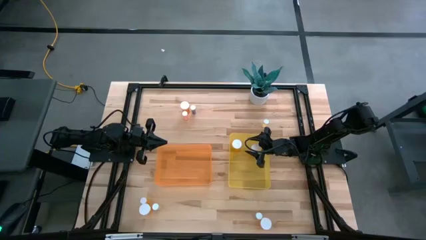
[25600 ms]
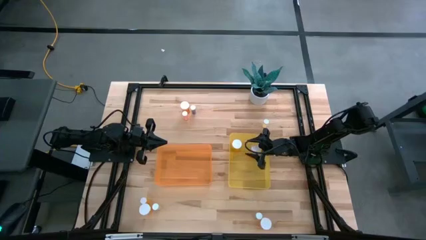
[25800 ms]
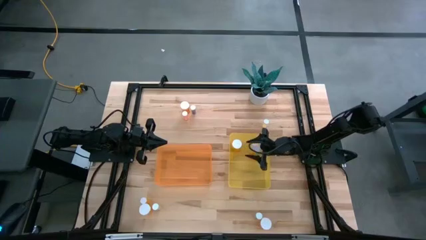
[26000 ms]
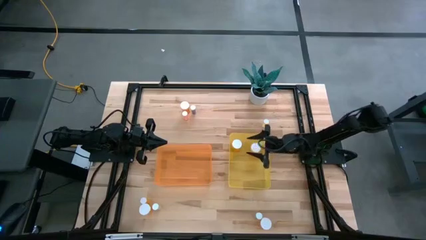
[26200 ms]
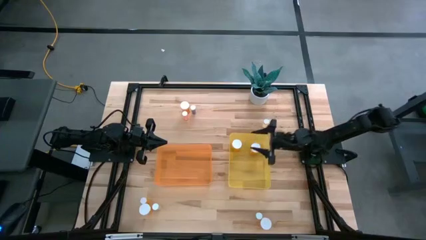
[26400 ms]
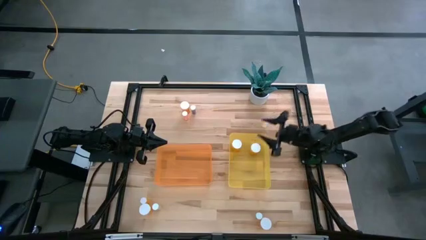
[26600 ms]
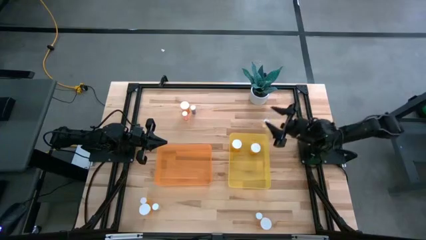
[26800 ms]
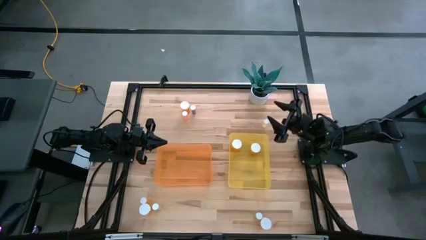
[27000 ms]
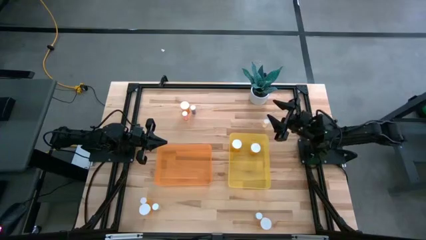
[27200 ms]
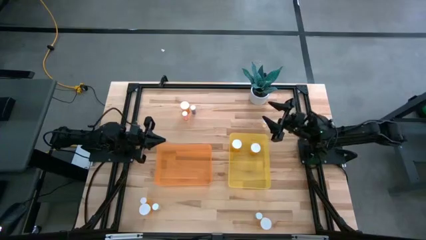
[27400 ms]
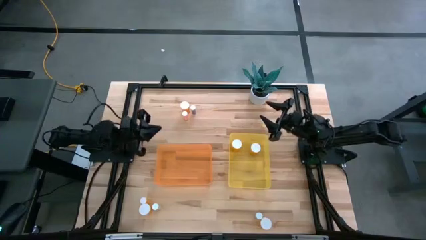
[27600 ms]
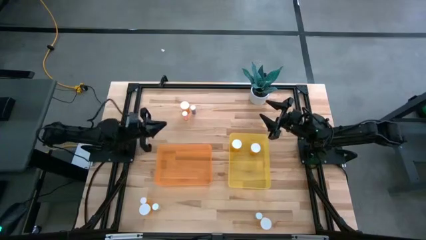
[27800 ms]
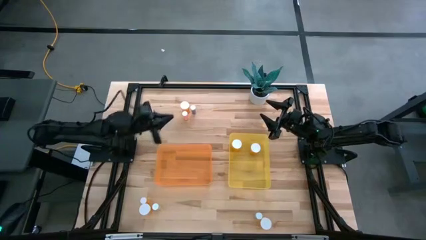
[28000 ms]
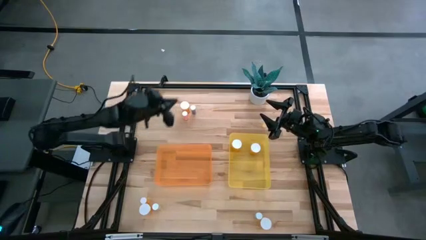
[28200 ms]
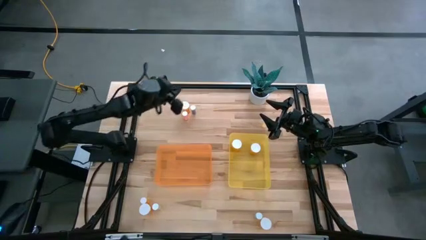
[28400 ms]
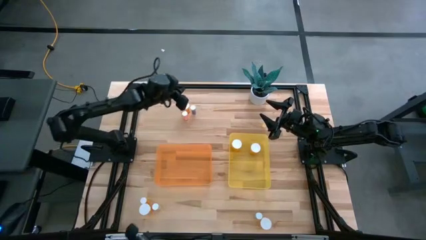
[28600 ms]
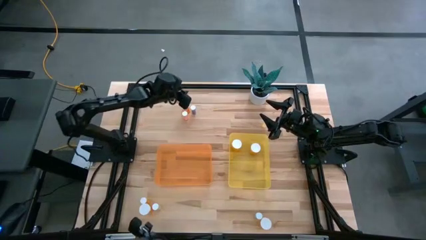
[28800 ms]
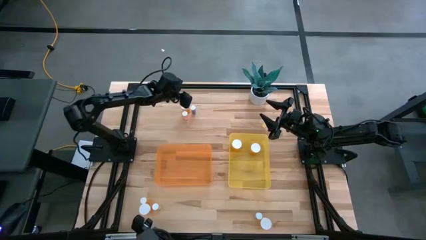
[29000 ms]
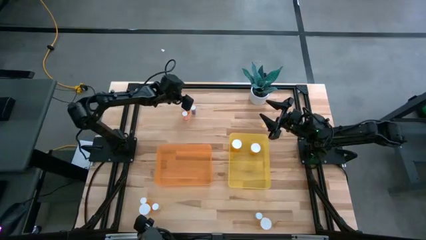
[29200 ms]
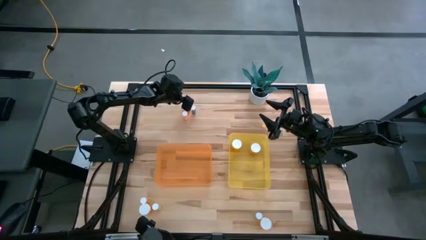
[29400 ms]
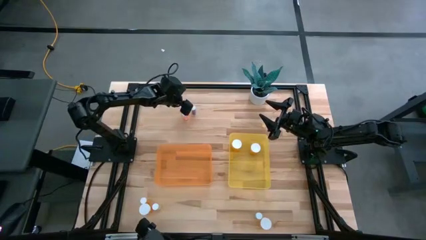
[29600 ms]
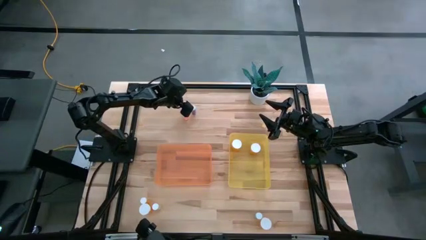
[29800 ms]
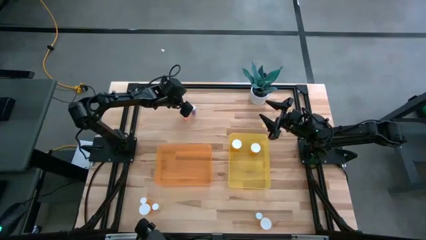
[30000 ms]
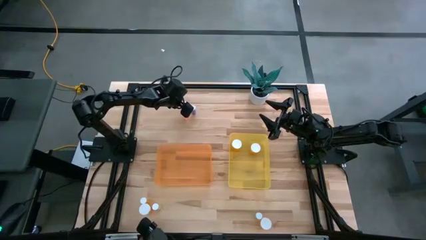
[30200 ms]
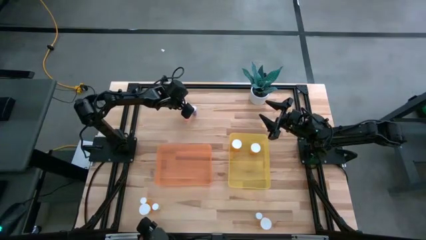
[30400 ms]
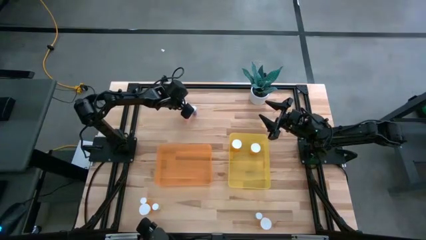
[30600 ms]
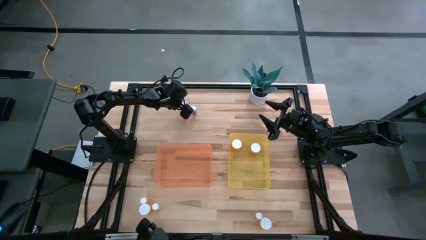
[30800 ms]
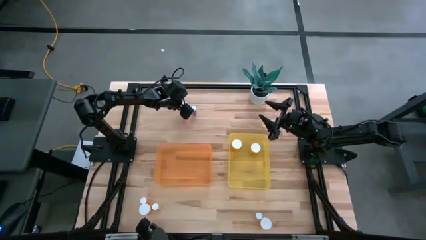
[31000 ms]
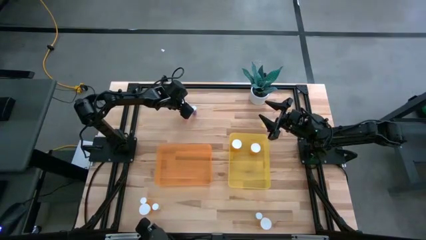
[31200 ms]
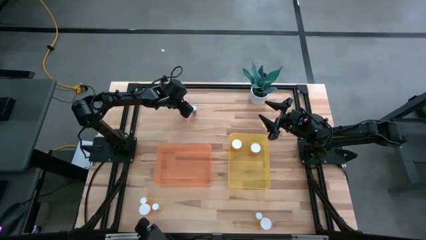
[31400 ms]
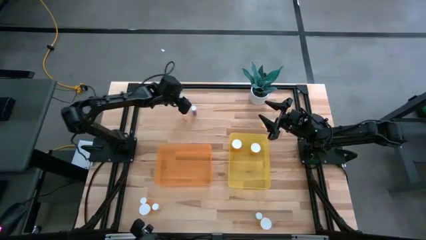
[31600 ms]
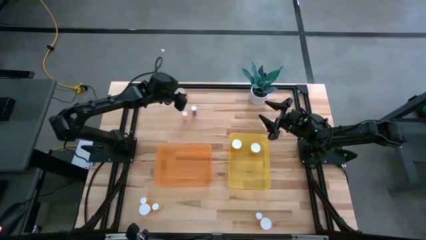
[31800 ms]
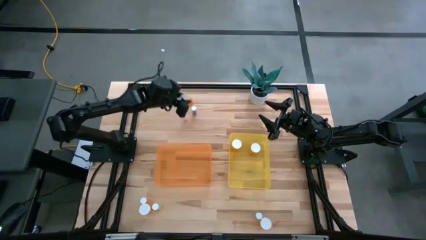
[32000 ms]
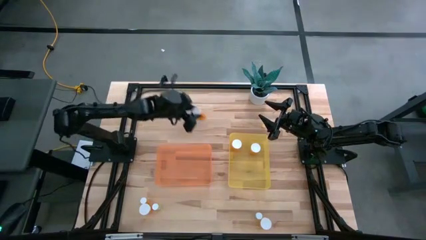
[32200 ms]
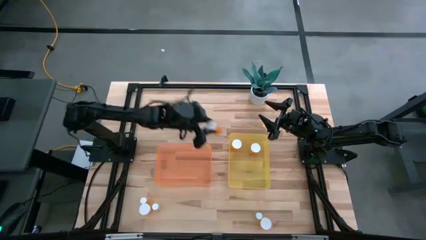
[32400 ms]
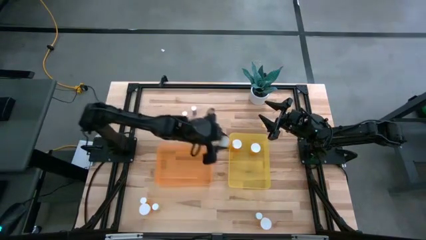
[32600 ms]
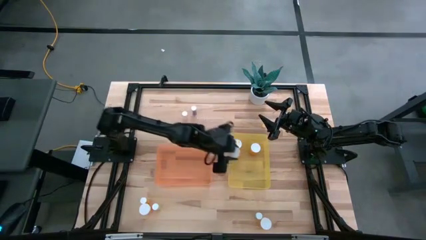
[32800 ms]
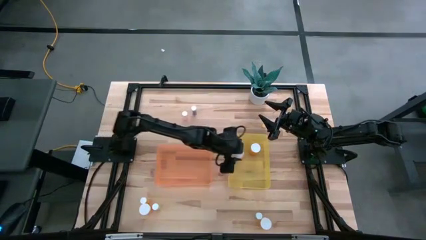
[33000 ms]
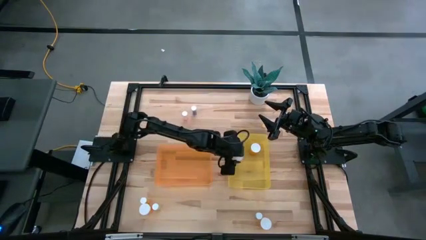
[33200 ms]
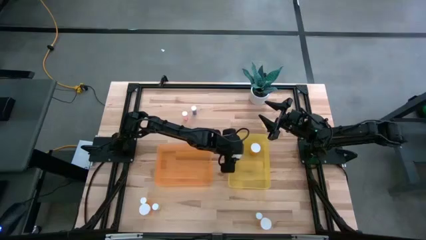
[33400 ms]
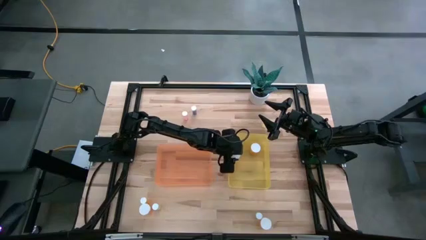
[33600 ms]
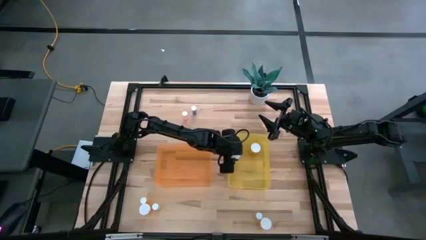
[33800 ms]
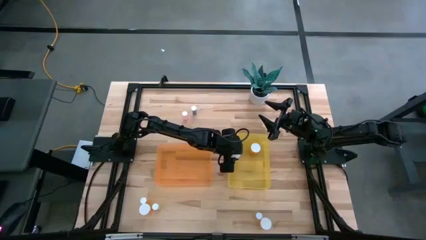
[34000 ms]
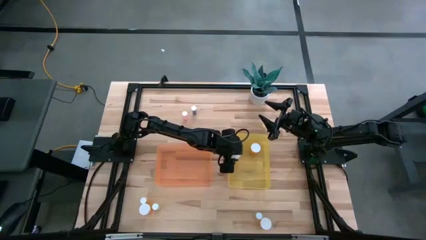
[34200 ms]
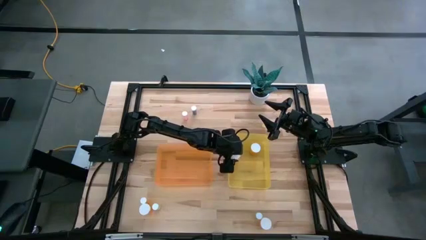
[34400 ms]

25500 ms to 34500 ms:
Task: Pick and place medicine bottles into bin by pill shape (circle, oval)
Put the top orange capsule bottle into the yellow bin

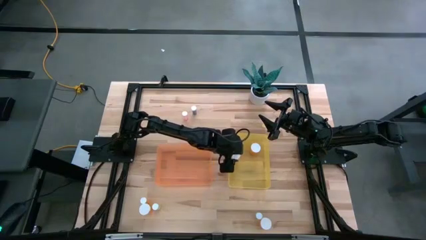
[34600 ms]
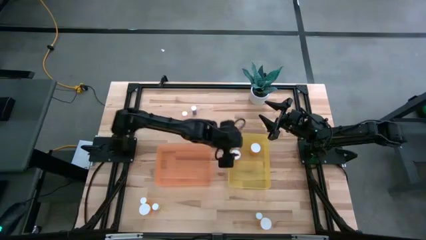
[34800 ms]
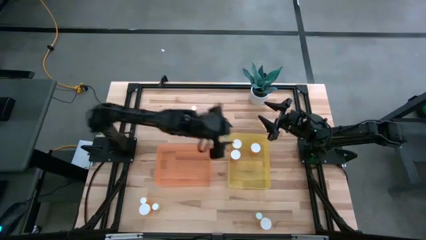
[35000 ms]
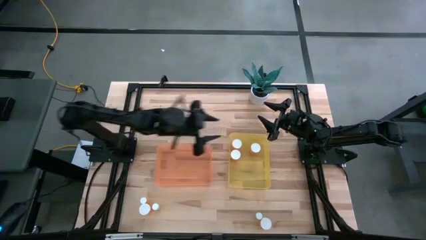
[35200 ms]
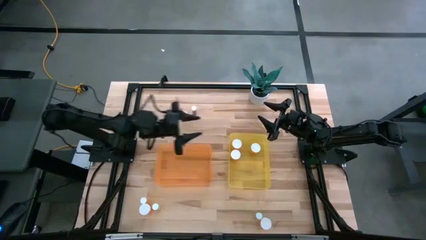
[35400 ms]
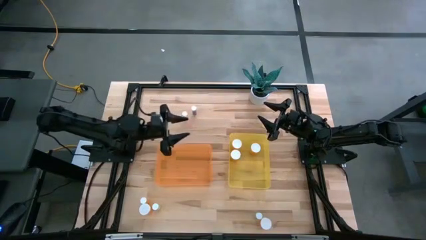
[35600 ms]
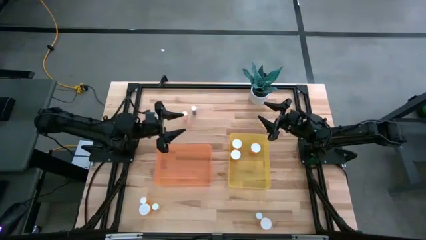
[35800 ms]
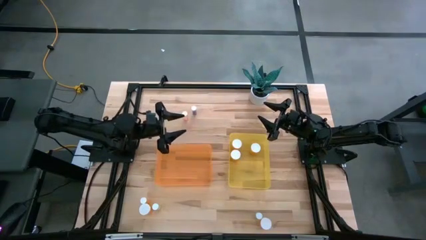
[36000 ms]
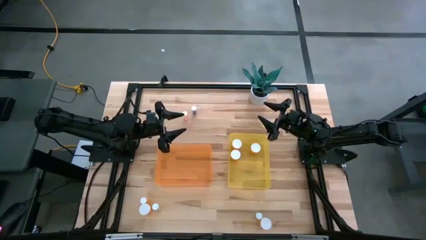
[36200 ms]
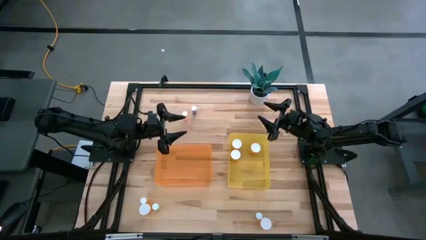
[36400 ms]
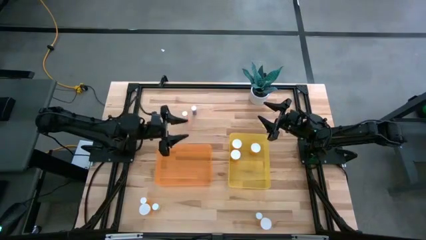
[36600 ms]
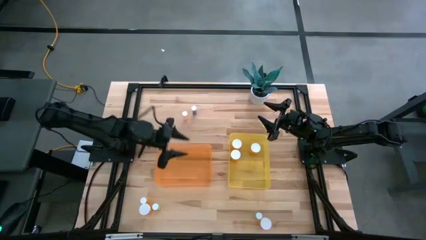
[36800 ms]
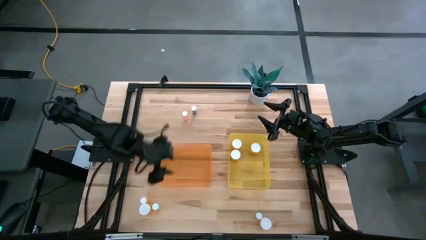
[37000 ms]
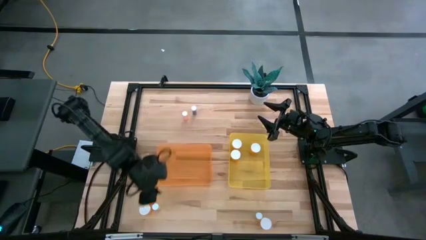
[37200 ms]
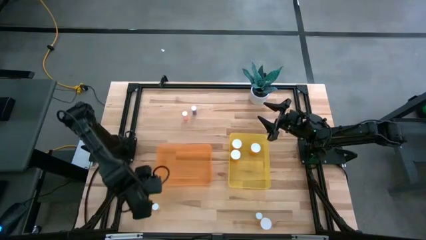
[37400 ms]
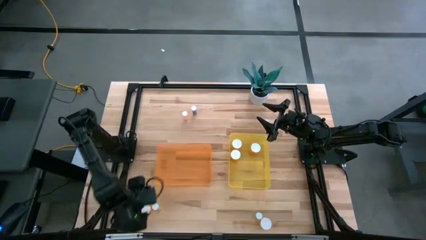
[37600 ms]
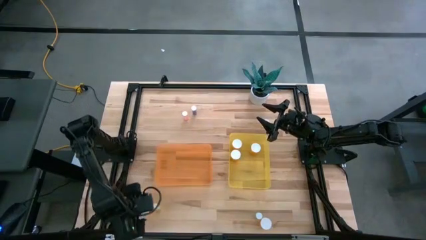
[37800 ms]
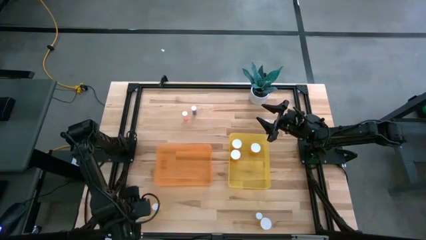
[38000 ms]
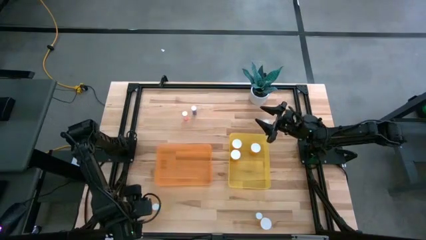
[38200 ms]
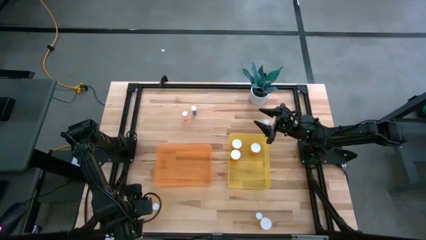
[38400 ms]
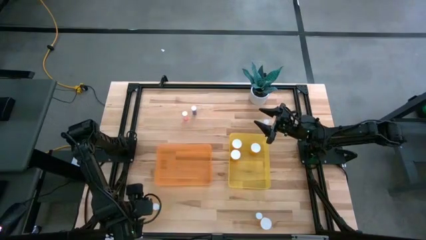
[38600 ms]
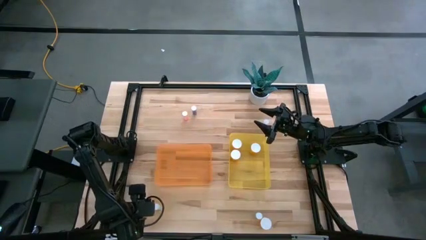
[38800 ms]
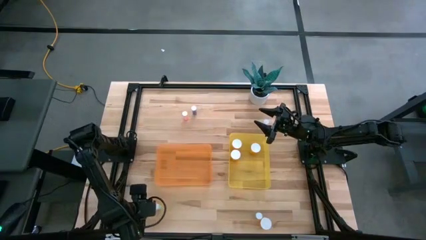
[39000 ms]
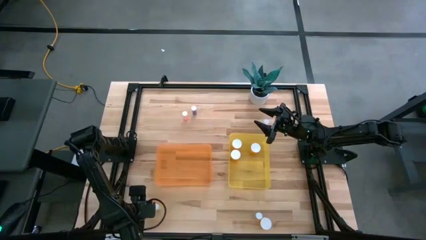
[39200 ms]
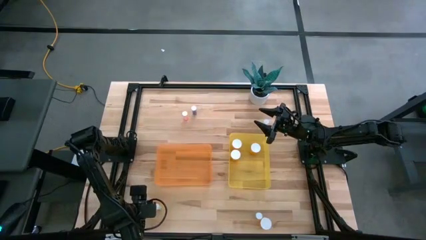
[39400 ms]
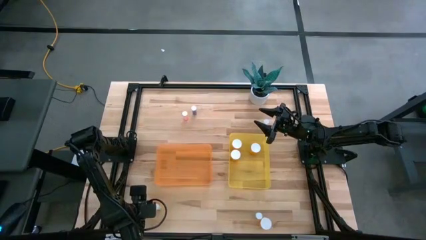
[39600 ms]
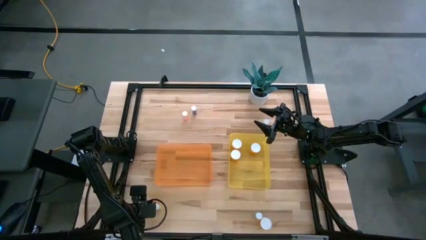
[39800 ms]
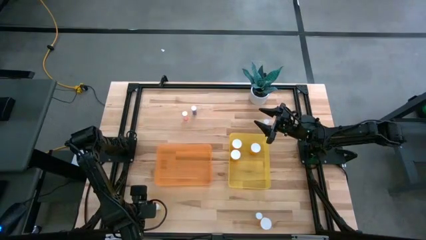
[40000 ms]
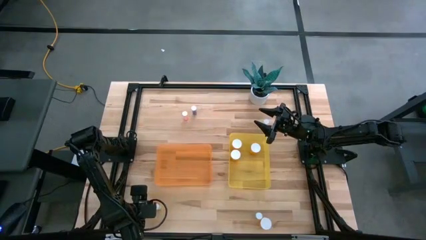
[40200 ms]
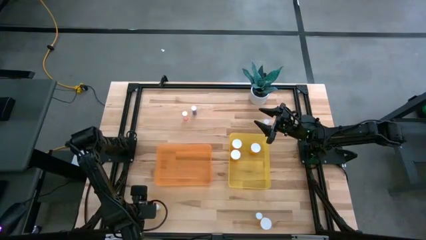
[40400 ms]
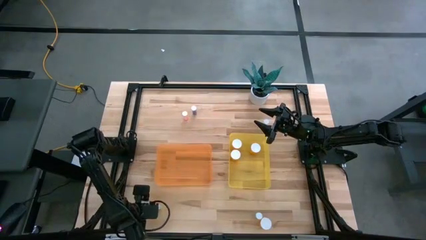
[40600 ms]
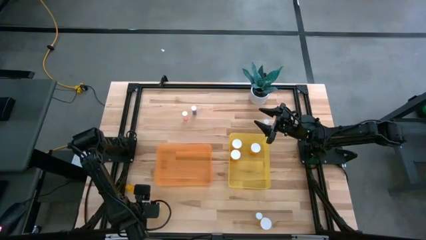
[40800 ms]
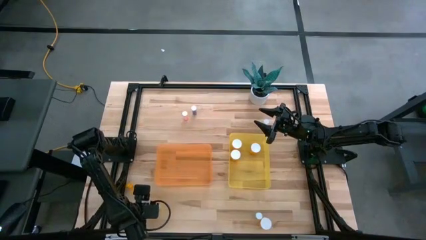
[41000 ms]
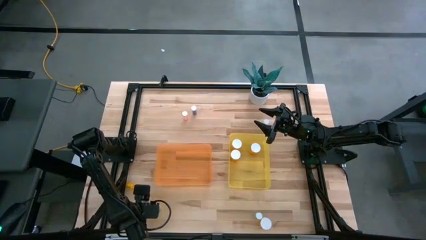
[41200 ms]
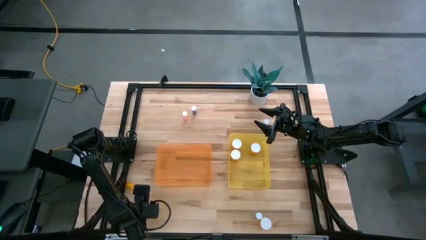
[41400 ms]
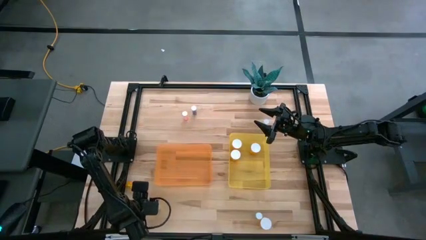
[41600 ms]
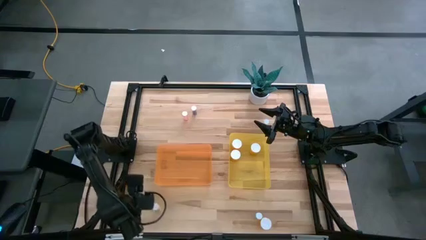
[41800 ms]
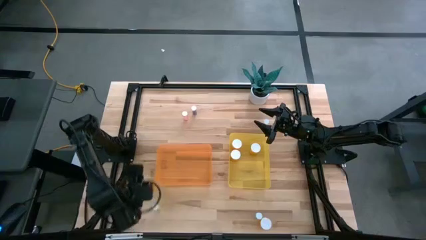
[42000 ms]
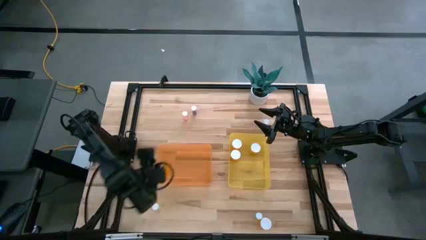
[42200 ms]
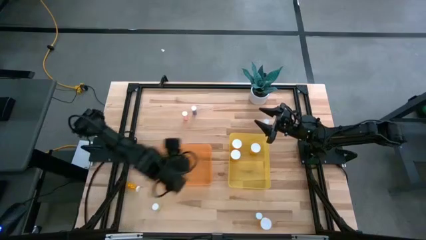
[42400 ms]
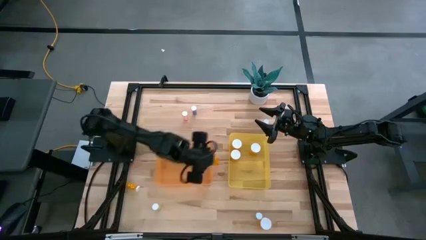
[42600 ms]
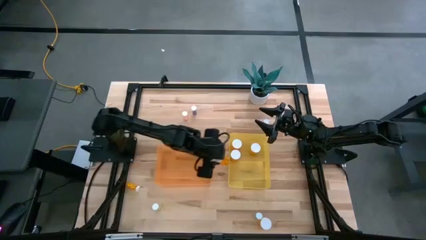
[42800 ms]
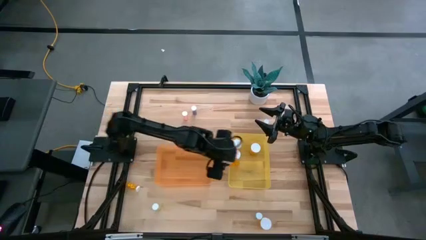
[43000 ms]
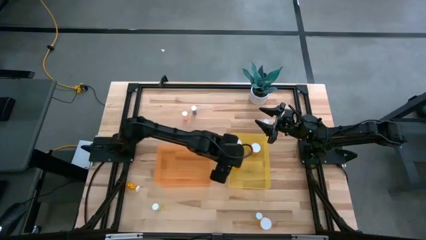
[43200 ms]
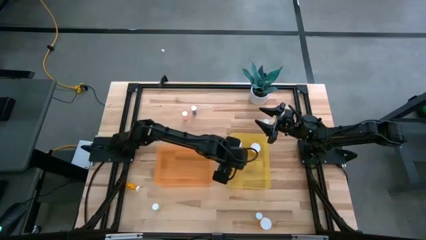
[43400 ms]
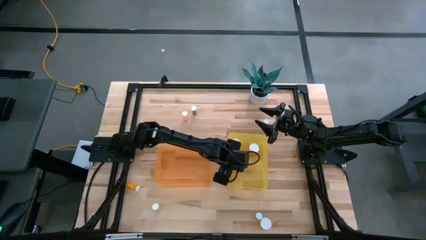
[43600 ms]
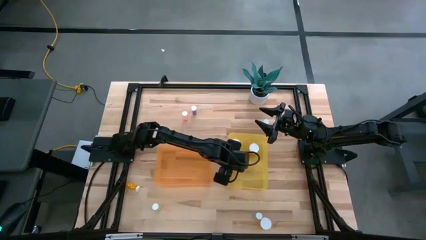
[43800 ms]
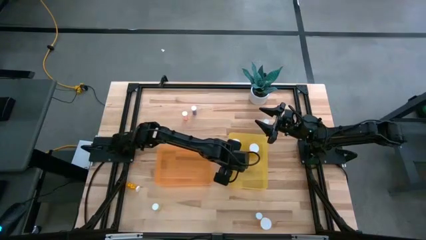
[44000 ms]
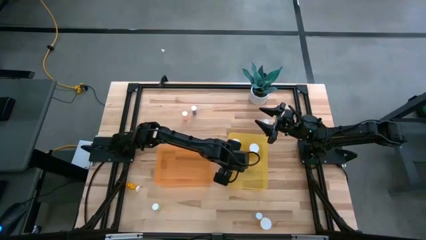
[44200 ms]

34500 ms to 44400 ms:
Put the left orange capsule bottle into the yellow bin
